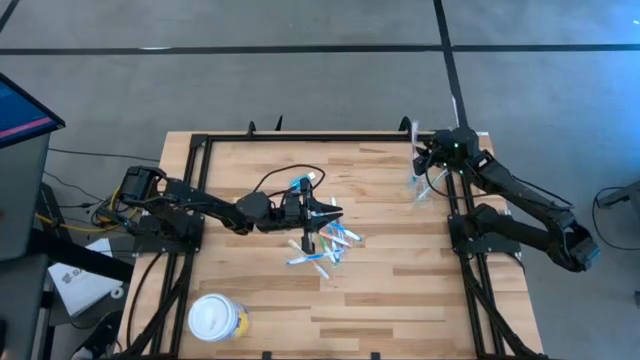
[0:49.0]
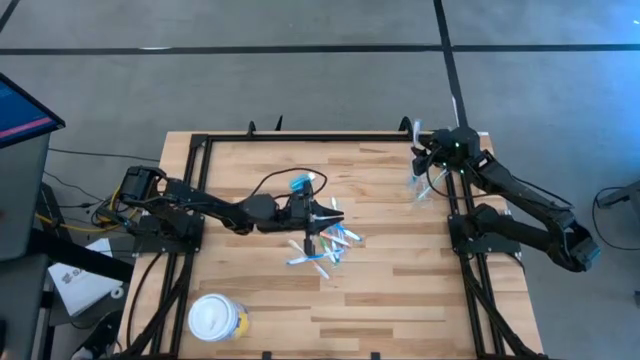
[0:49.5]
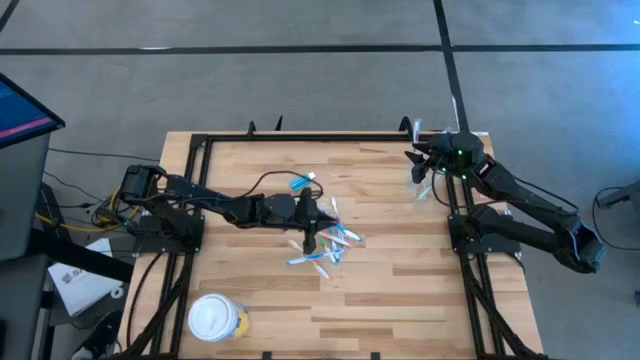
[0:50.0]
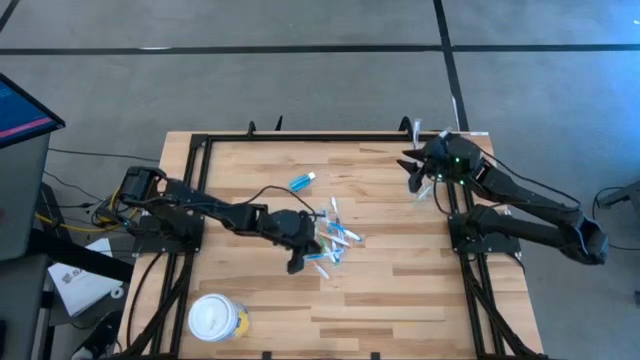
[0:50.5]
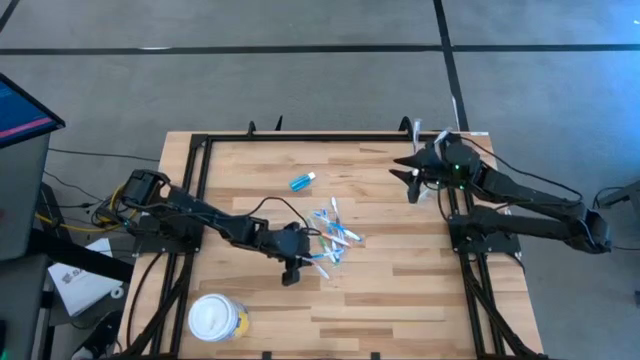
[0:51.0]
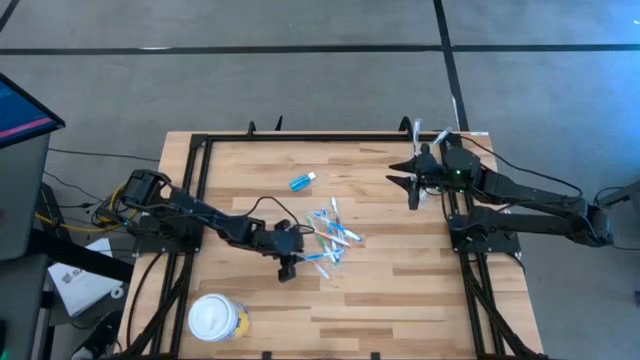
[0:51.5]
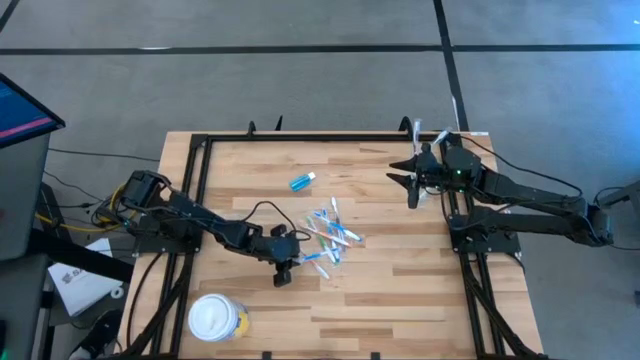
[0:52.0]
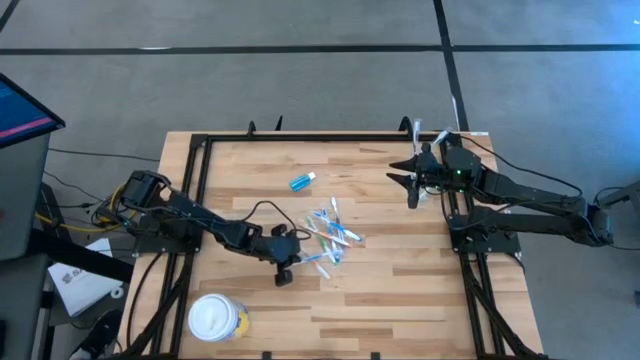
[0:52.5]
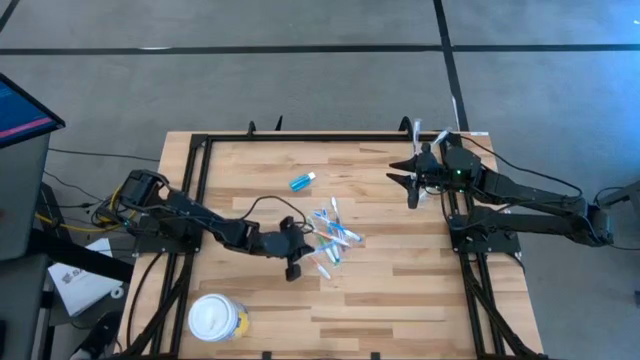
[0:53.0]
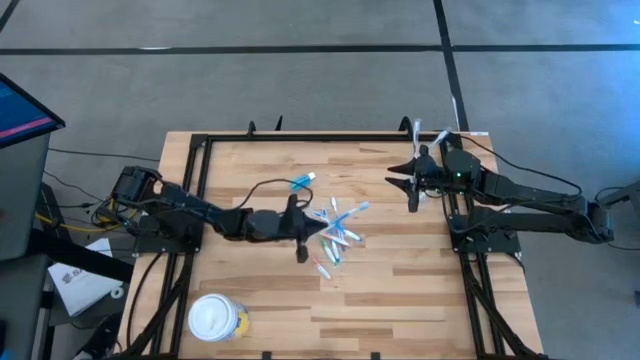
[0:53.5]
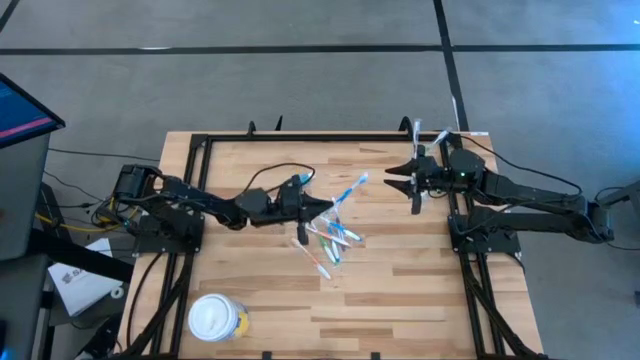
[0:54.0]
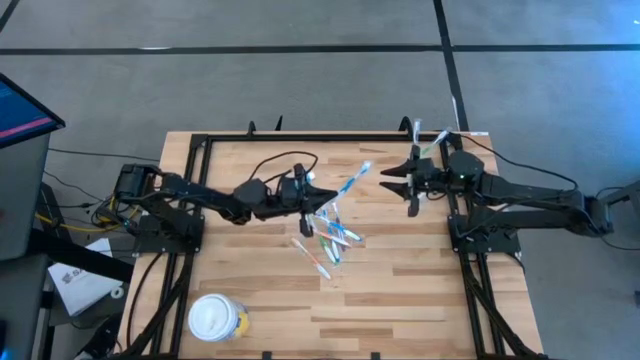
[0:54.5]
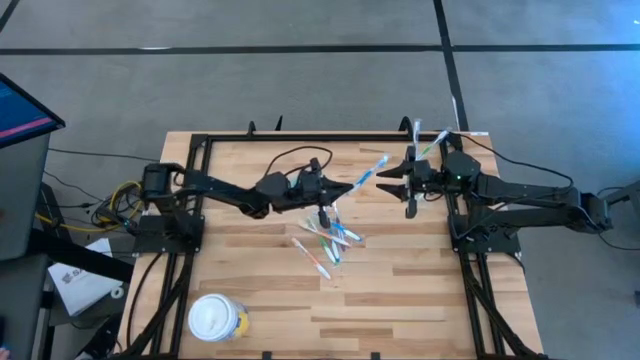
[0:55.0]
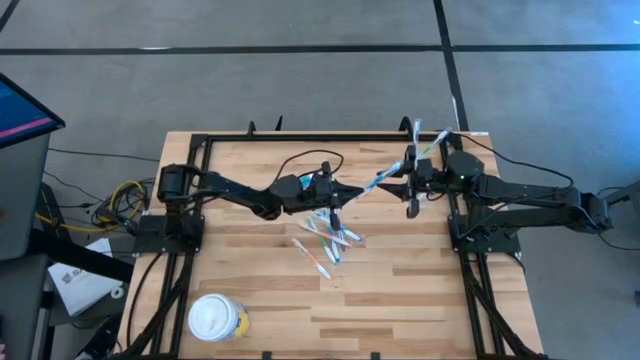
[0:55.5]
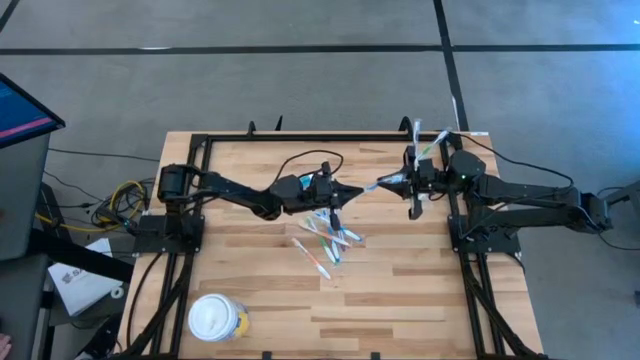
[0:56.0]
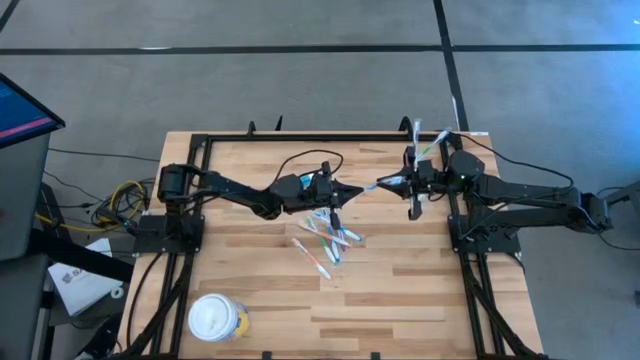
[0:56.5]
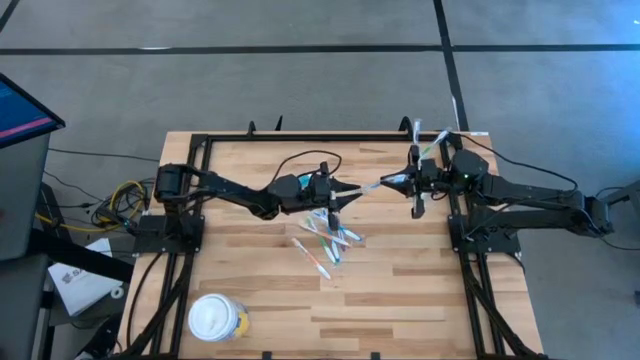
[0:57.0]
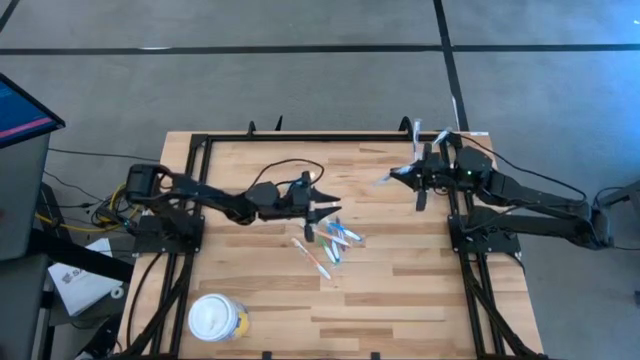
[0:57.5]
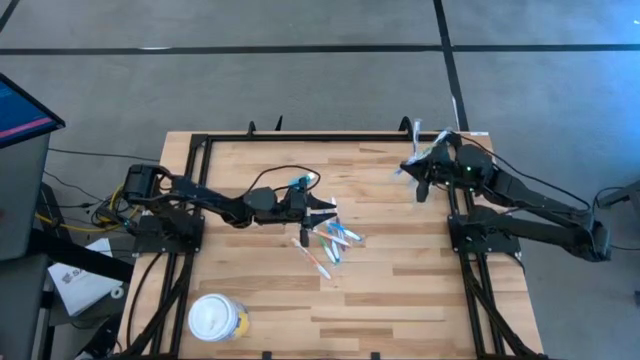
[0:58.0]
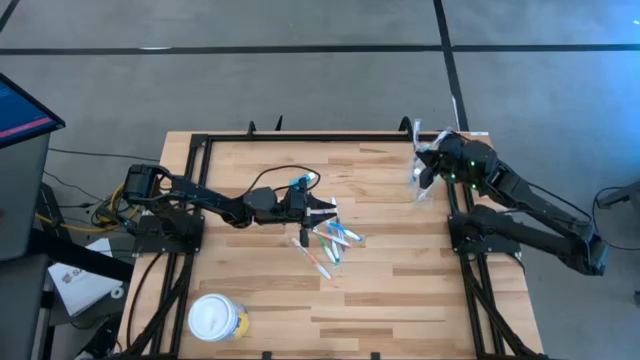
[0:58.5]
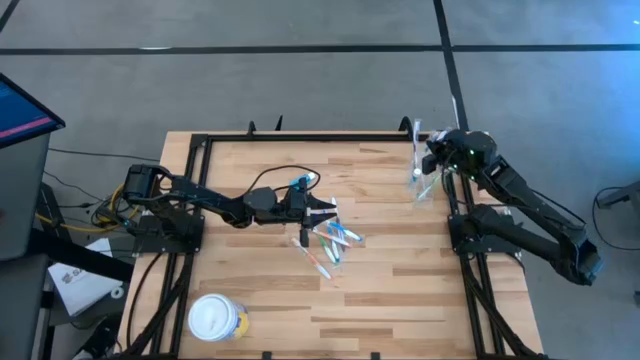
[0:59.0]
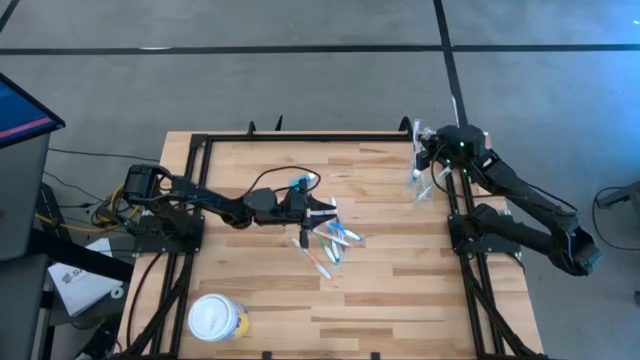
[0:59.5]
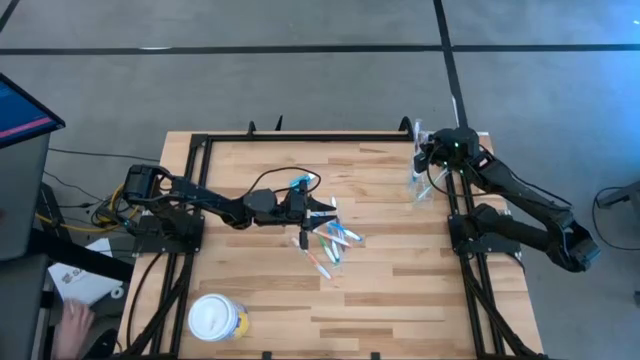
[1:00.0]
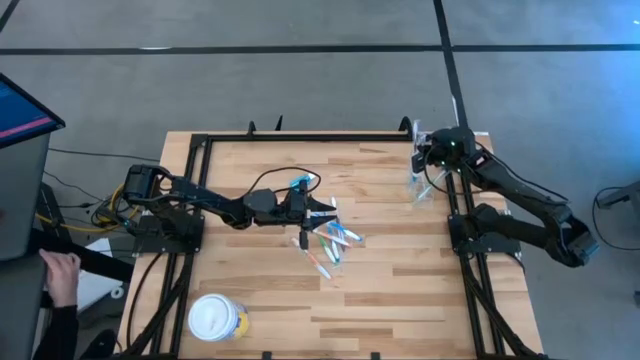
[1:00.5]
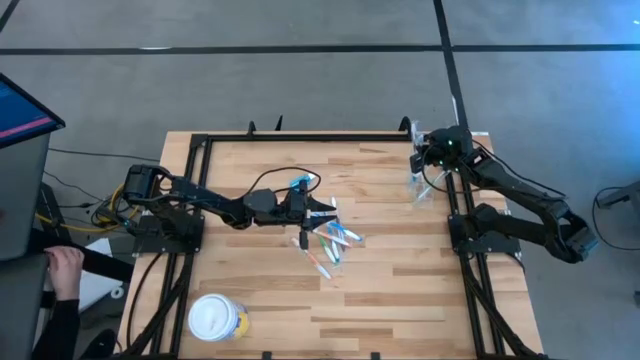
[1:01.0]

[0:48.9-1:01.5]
Task: Pick & Place toothbrushing station
Put the blue toothbrush into the transparent organizer

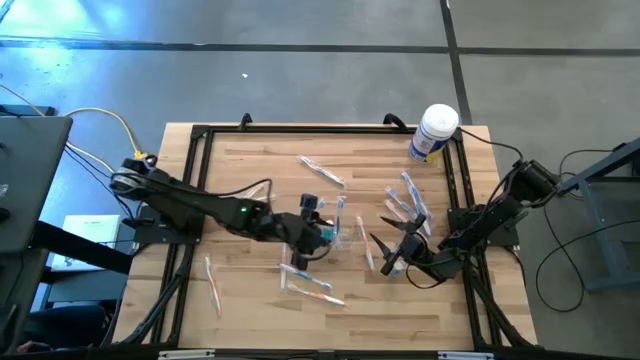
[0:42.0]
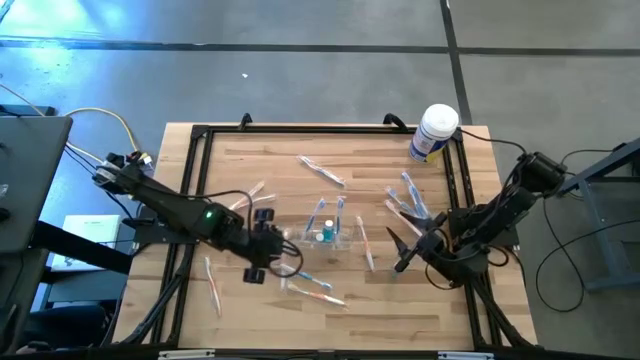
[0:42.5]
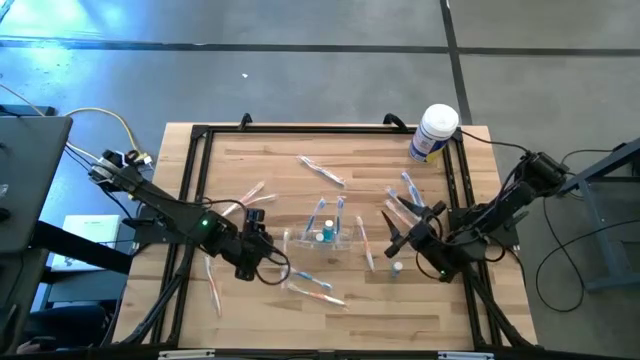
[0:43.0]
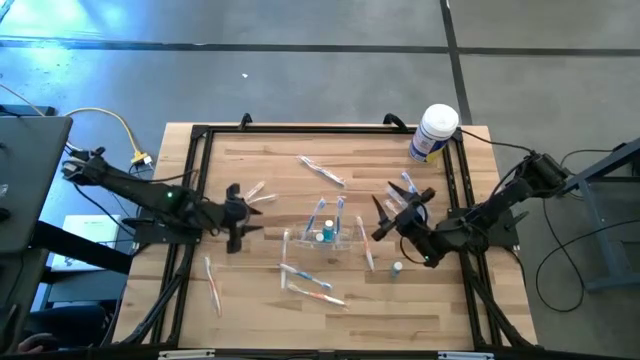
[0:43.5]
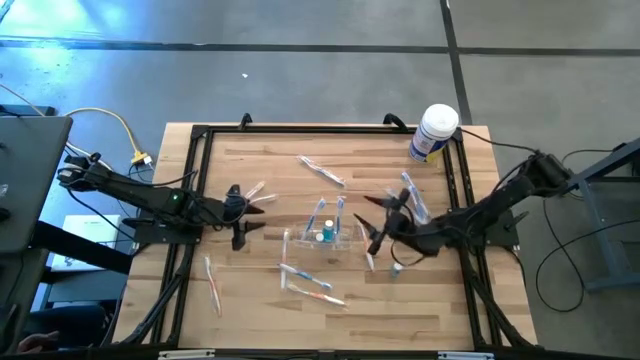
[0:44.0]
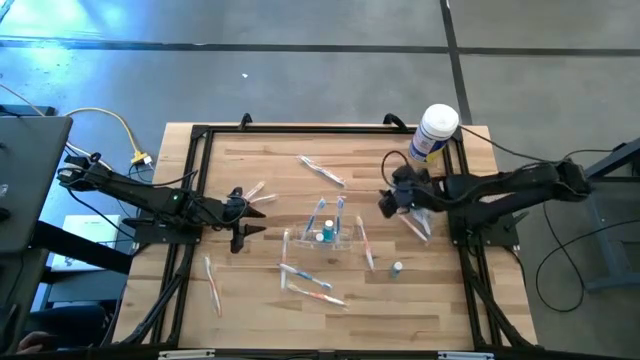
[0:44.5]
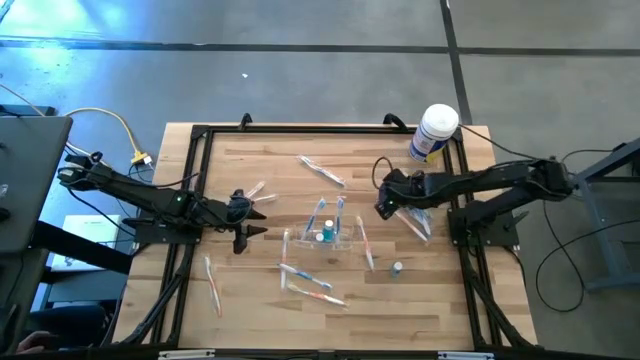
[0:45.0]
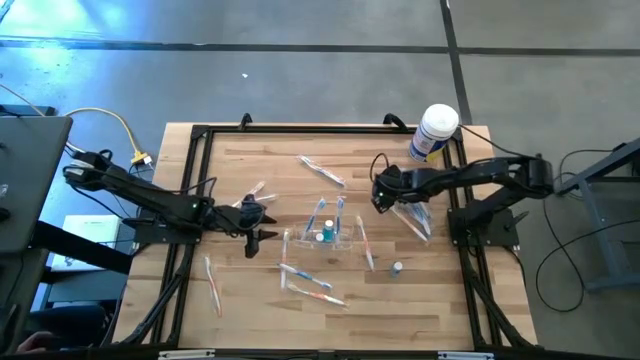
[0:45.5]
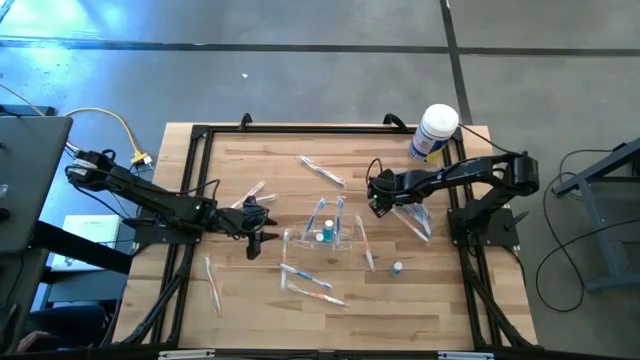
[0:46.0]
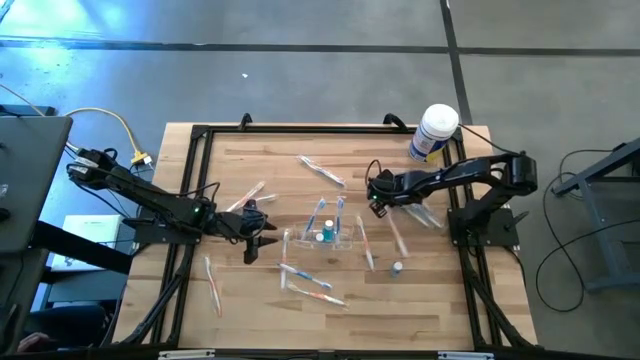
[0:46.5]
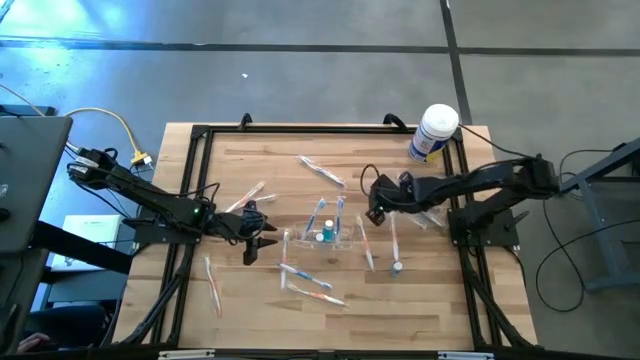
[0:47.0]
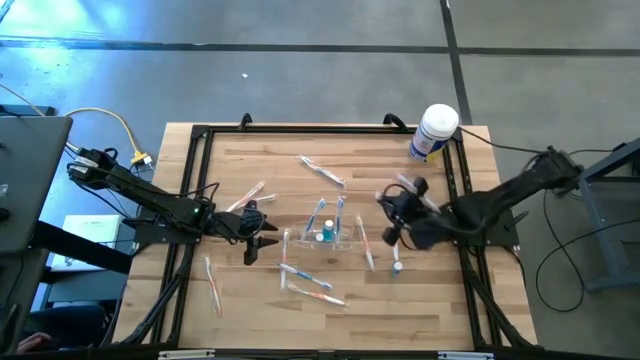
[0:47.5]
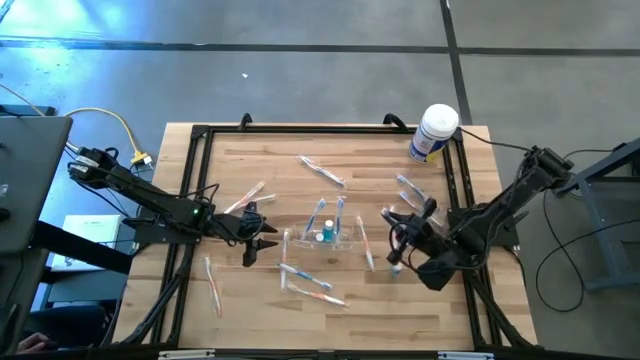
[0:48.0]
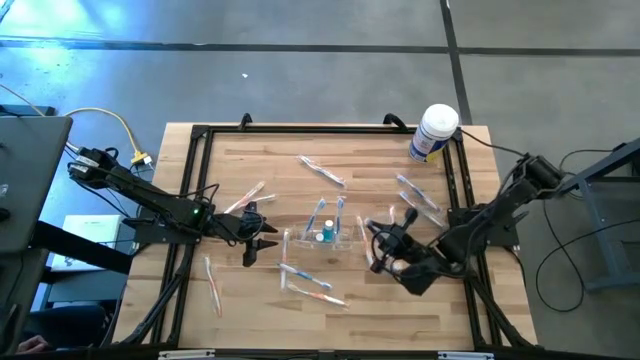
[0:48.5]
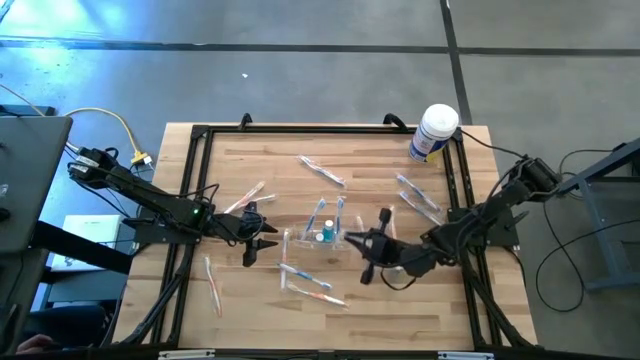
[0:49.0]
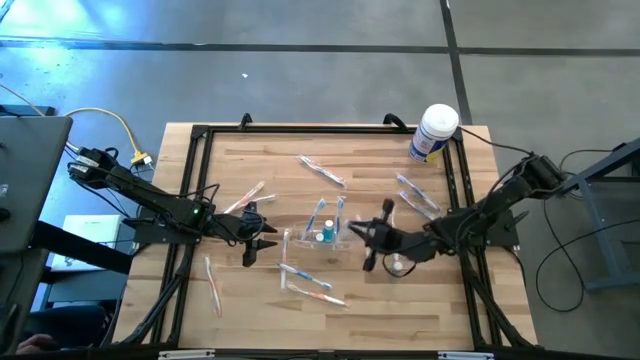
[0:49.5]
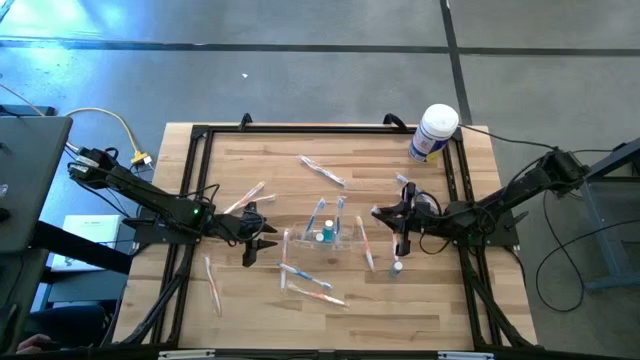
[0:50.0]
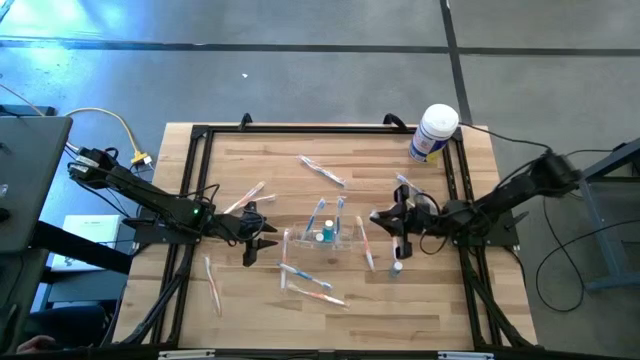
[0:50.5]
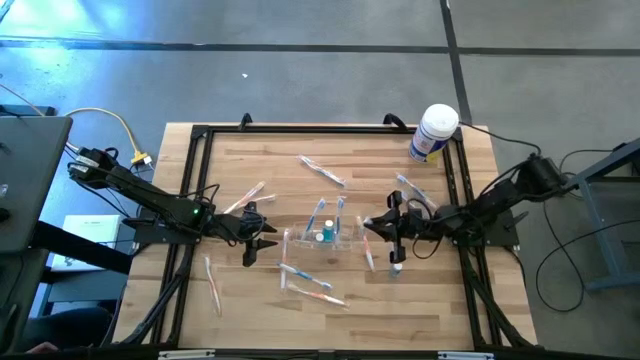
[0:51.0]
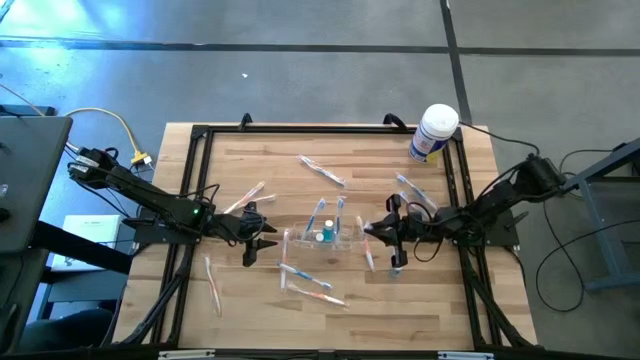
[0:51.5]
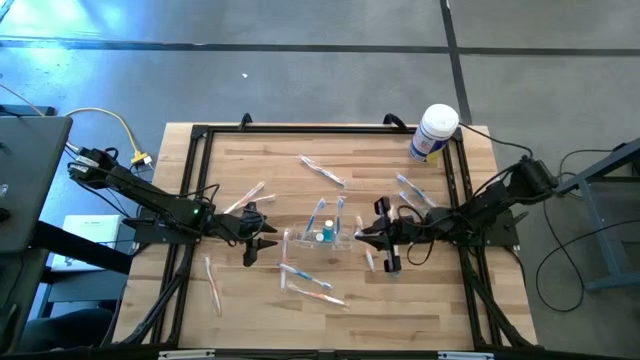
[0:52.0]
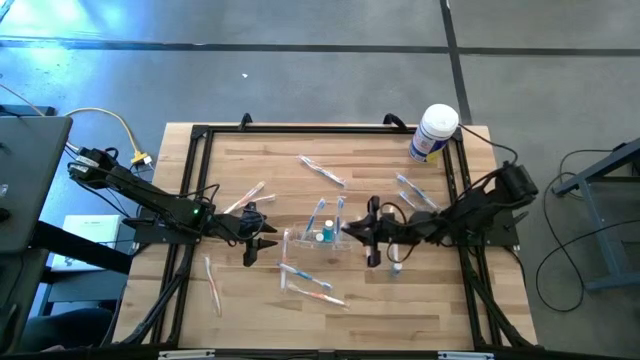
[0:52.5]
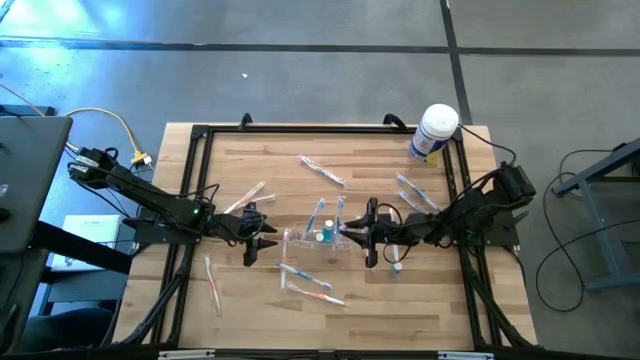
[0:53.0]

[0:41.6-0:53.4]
Task: Pick & Place toothbrushing station
Put the blue toothbrush into the transparent organizer
